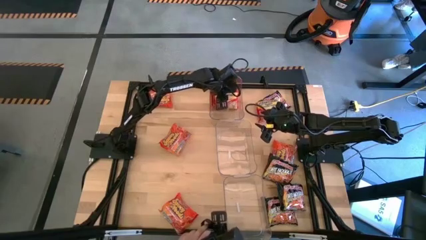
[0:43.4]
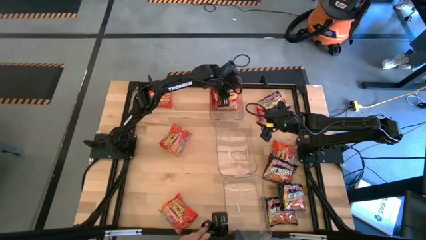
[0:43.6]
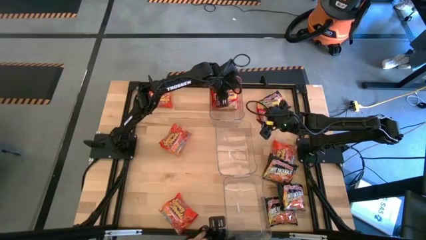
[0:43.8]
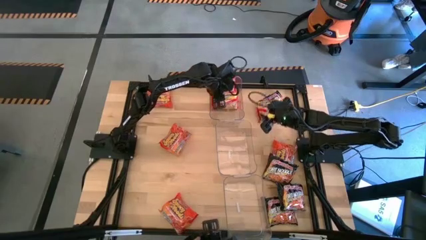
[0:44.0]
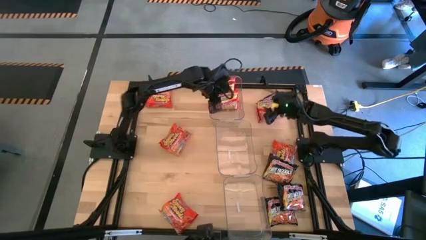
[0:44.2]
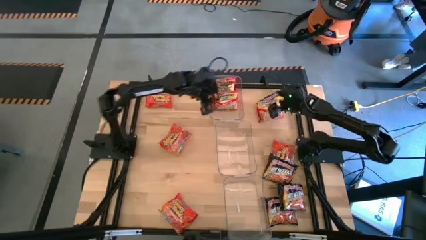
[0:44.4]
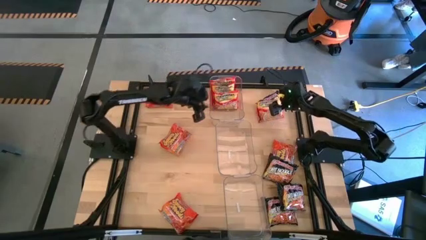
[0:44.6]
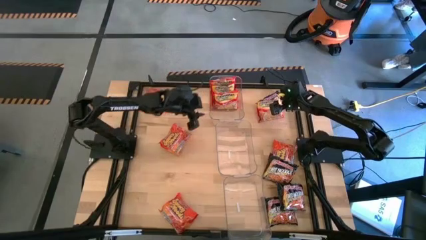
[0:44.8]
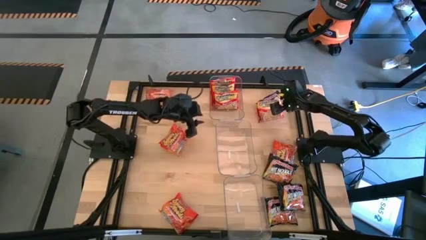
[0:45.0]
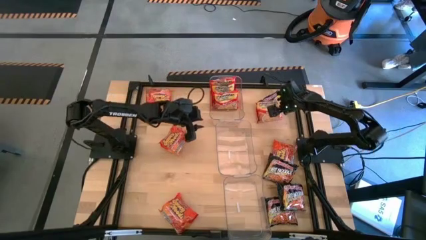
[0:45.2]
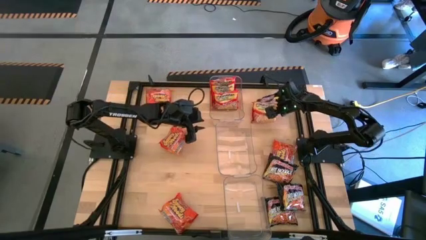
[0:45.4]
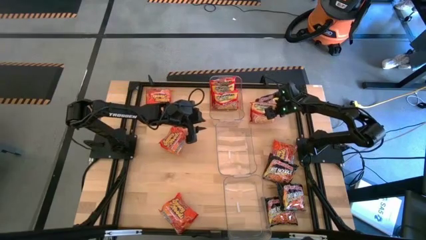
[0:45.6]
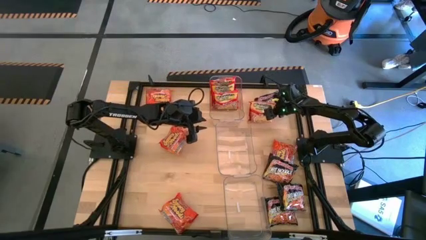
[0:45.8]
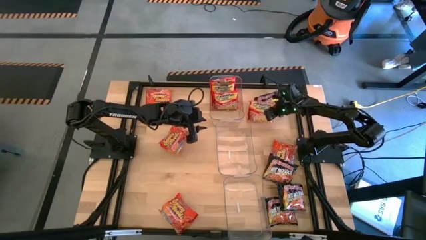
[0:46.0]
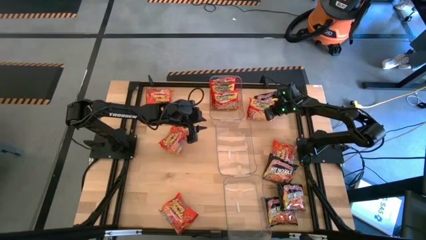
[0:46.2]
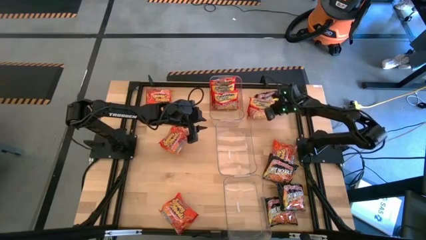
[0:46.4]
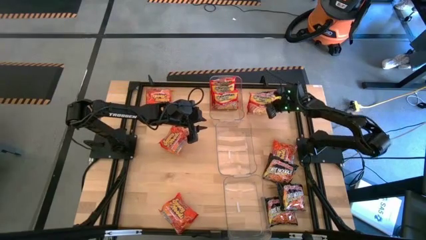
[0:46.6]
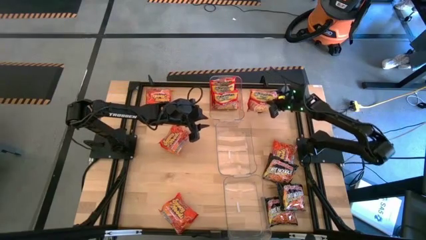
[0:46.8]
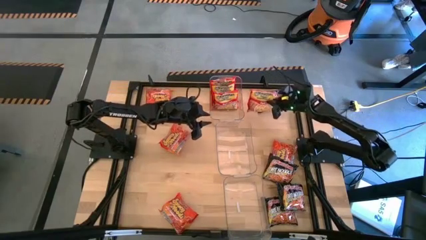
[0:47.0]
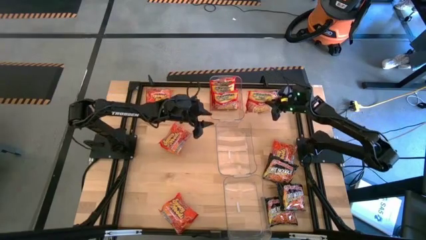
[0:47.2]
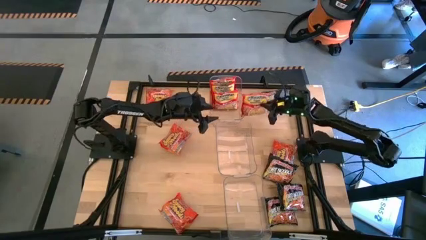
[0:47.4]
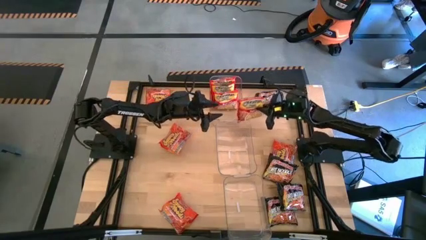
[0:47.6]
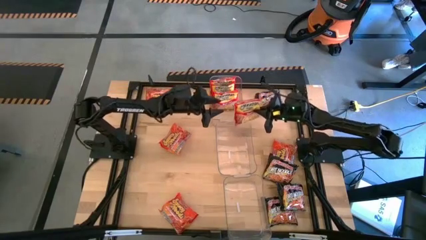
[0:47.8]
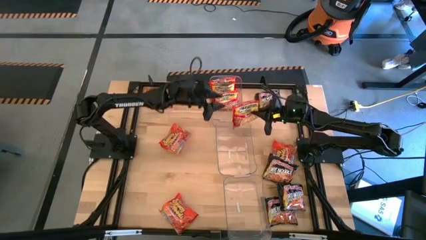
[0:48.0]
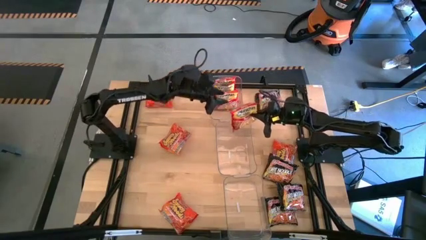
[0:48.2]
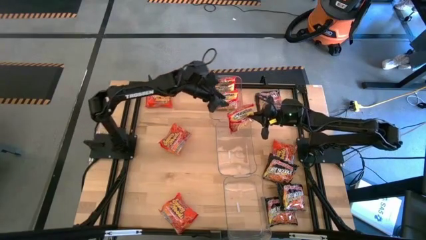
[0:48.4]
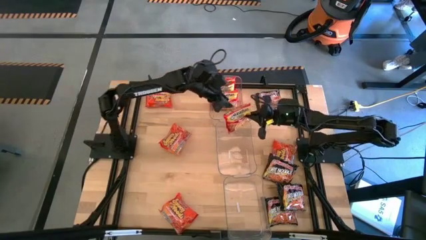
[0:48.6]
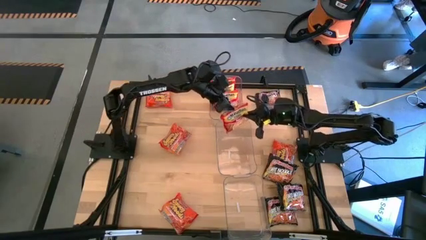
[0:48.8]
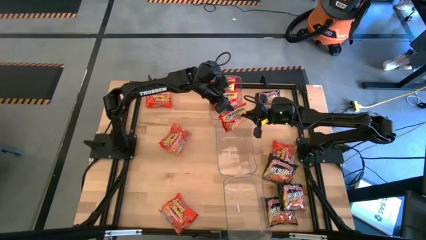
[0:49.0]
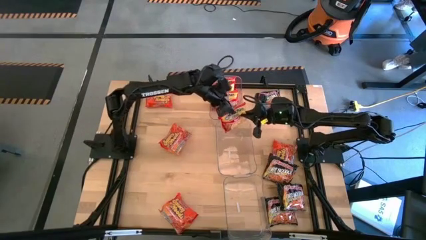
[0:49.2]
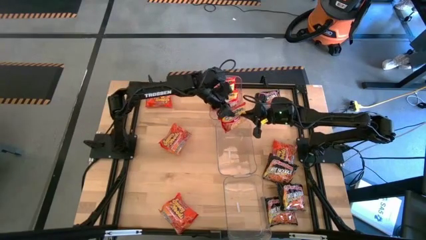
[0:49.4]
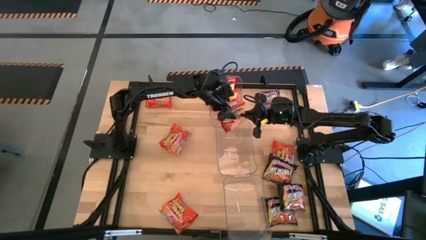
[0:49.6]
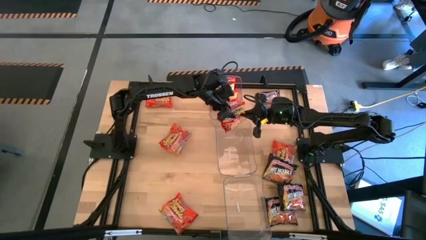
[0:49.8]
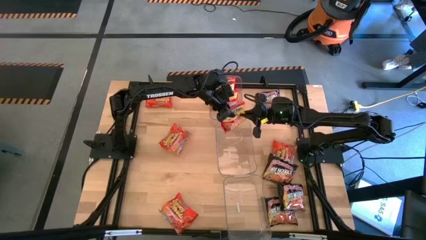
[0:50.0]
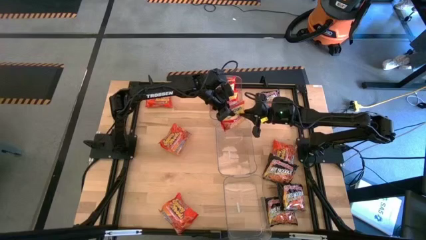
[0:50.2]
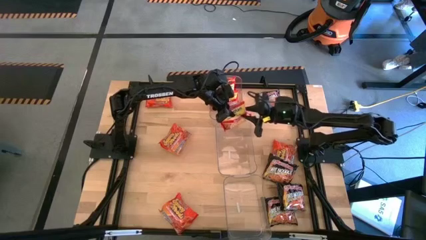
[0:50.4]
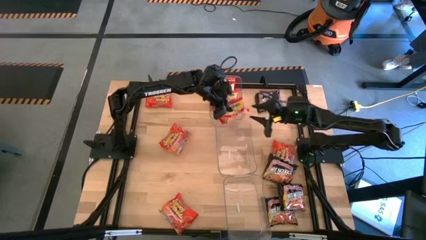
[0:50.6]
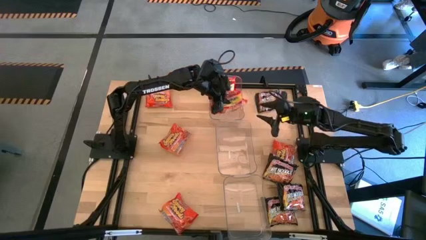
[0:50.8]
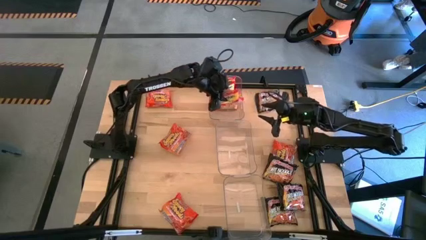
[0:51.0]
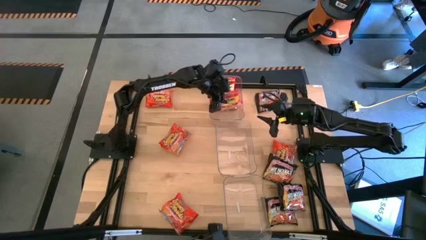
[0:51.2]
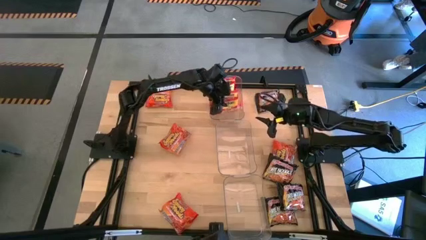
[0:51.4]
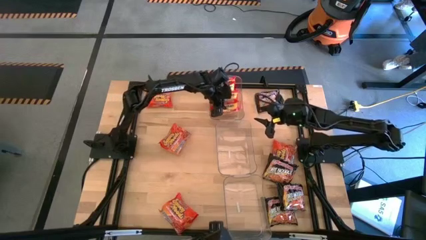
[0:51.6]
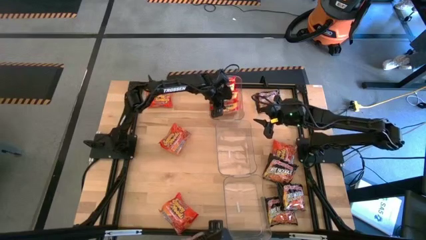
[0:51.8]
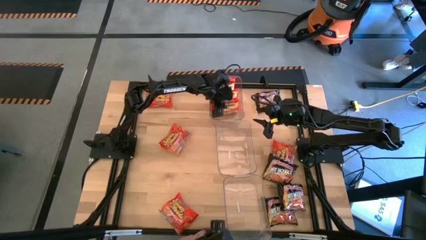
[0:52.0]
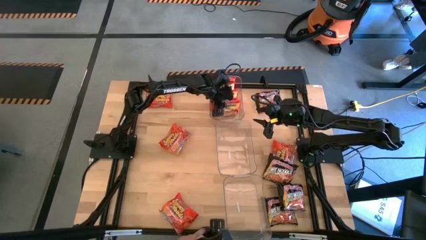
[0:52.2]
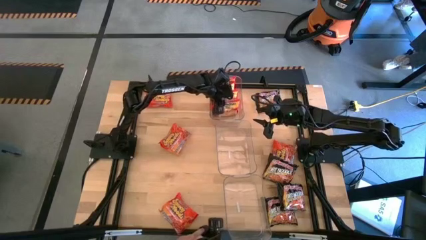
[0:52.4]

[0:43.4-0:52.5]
Task: Sort Maruchan noodles
Put the red noodle pack into the top transparent bin

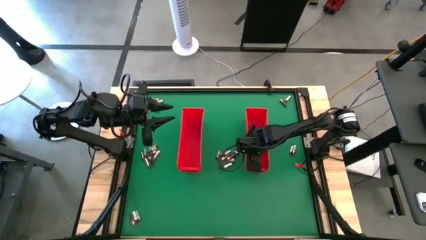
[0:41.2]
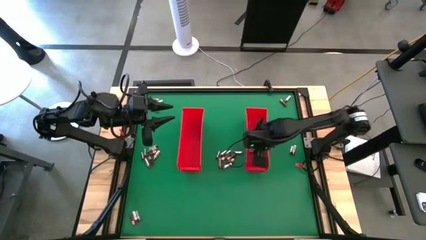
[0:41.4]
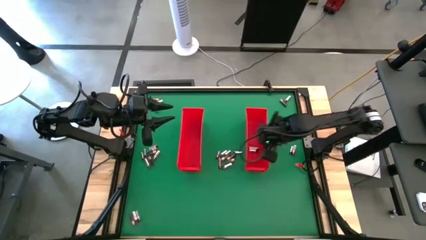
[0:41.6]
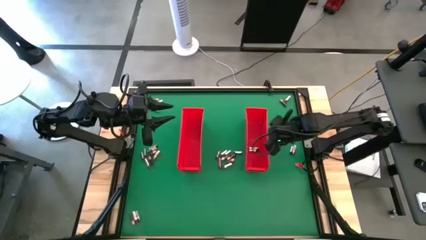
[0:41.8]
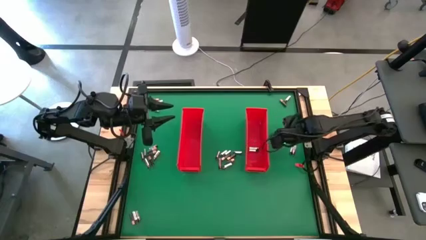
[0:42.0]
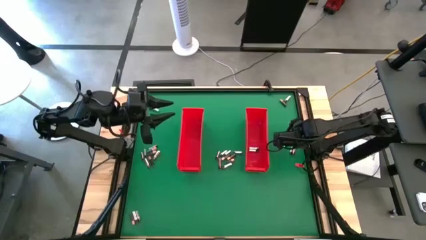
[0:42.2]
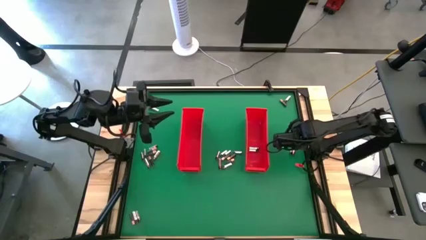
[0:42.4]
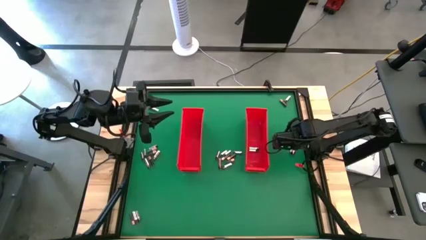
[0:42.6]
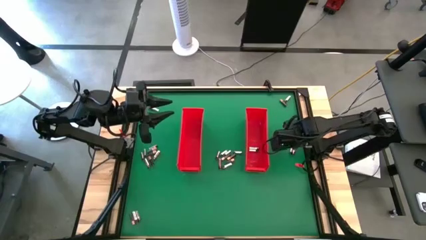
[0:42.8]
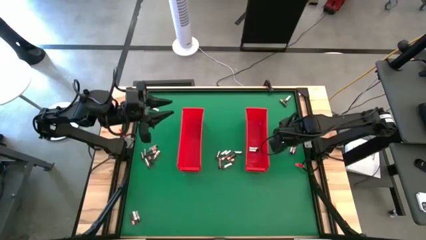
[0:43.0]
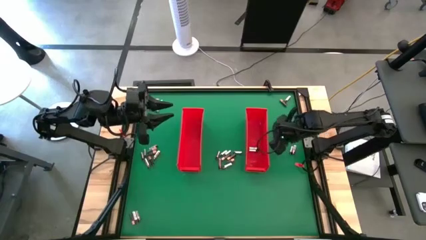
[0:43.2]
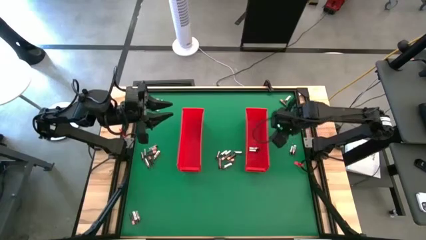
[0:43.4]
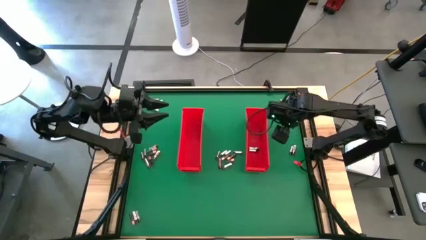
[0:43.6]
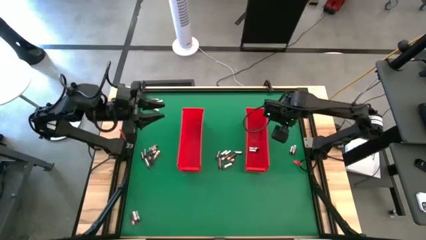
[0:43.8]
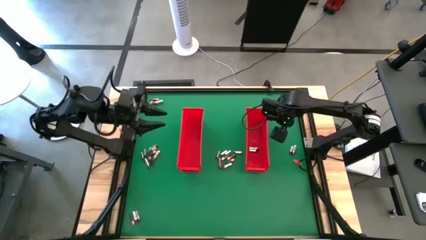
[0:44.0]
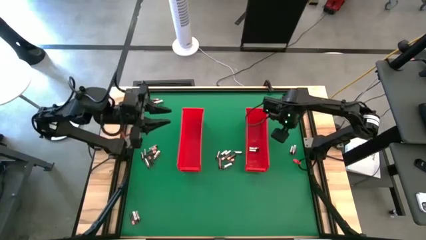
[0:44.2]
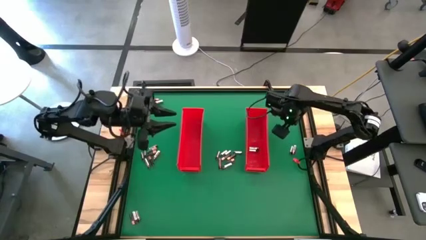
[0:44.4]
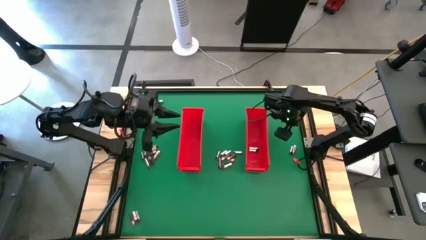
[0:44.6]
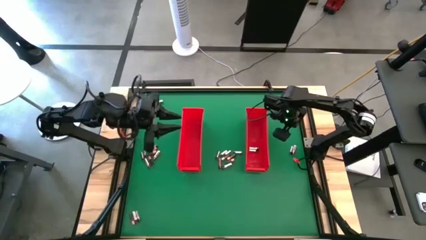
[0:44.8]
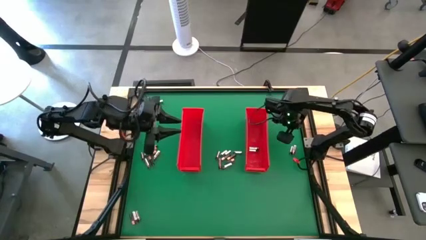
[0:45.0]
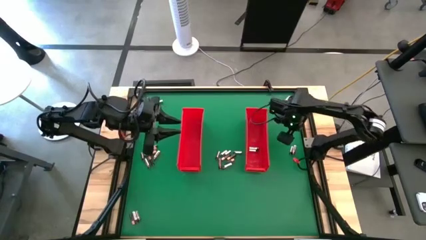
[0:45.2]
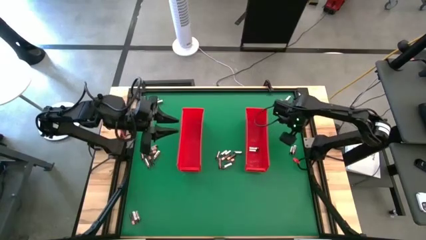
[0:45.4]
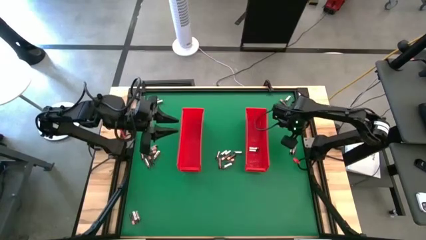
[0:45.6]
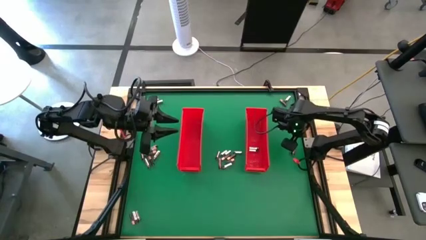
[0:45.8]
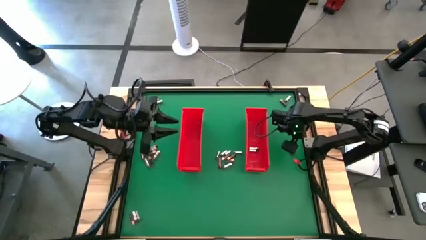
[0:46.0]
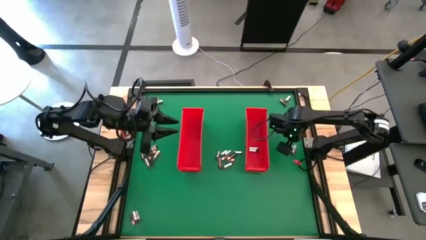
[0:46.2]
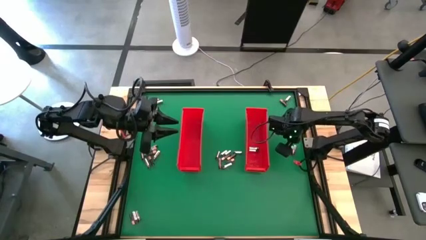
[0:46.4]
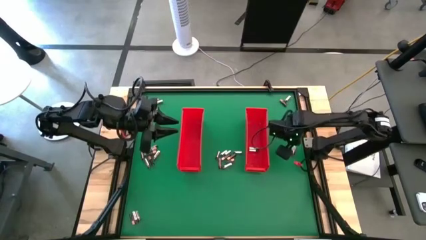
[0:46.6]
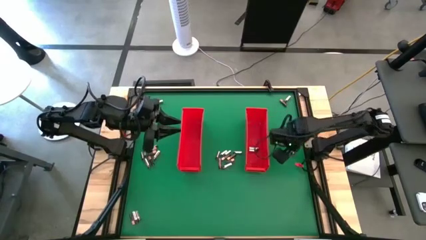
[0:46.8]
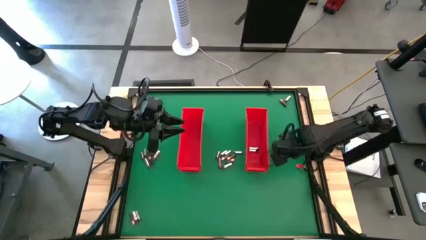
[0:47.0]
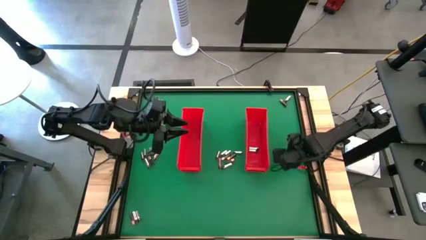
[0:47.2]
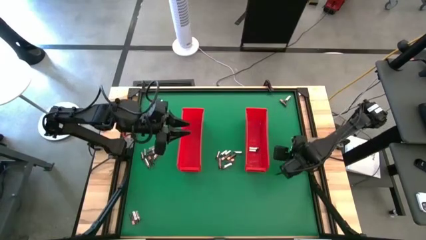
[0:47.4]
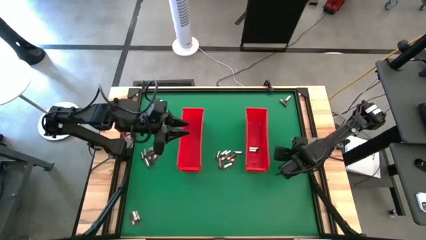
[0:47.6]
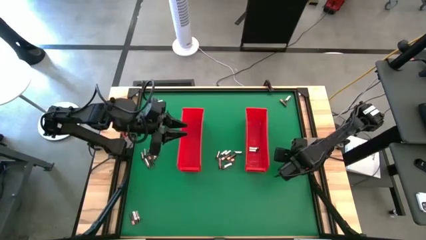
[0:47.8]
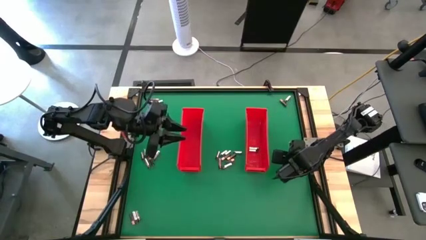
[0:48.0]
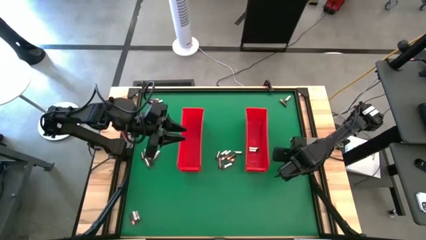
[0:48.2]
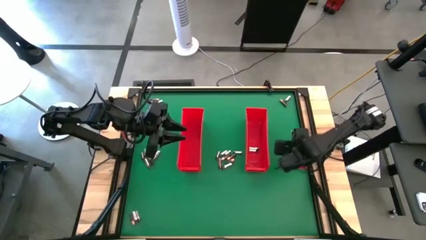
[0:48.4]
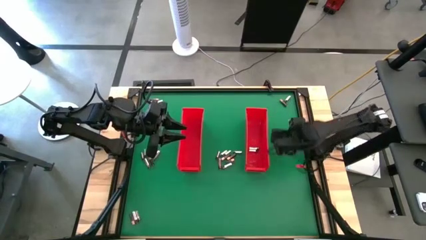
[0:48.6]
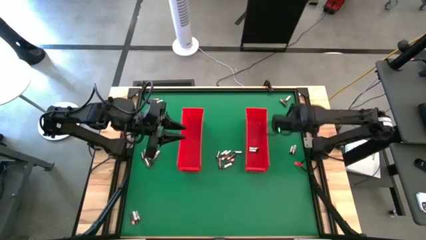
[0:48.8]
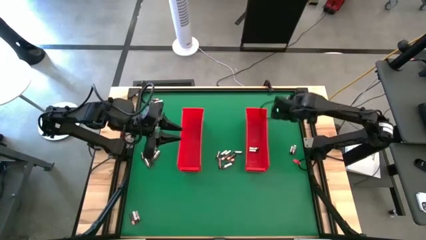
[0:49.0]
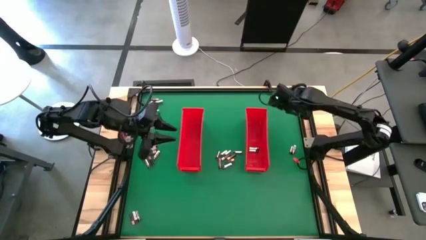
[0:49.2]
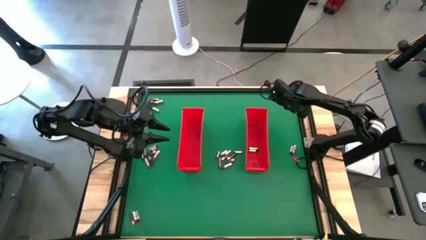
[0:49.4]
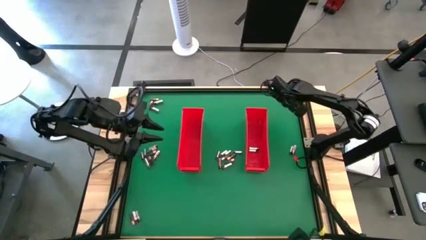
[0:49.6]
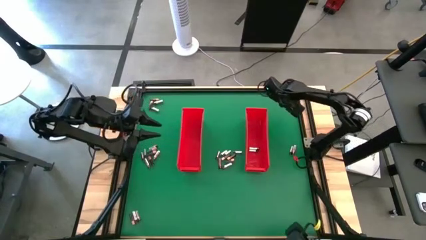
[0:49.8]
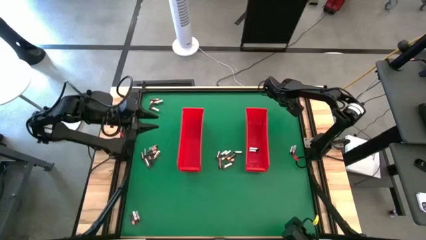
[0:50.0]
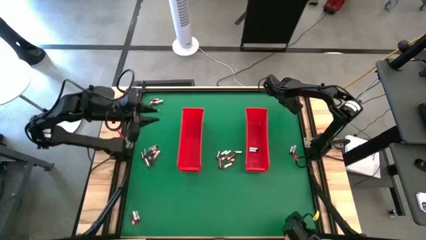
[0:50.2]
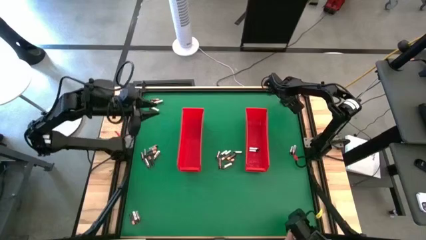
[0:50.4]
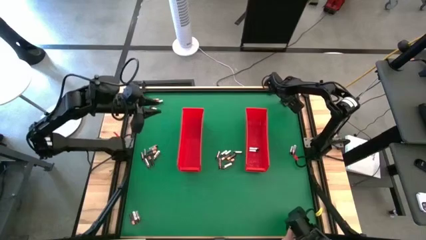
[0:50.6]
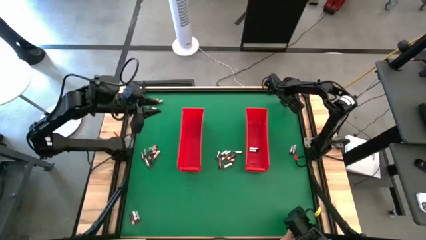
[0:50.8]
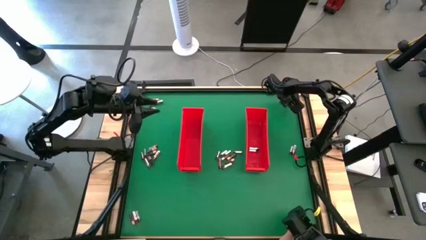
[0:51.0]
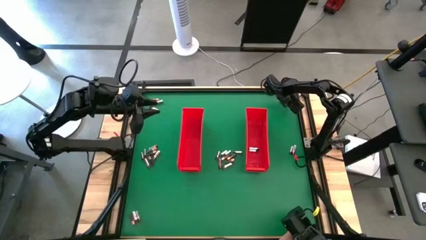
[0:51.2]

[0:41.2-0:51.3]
Task: Sort batteries
Put the silver battery into the right red bin
